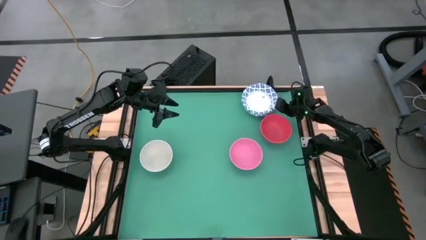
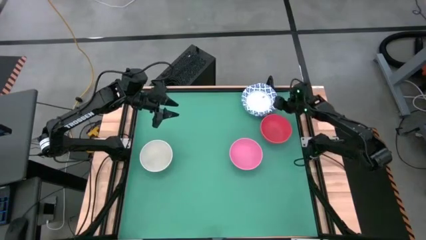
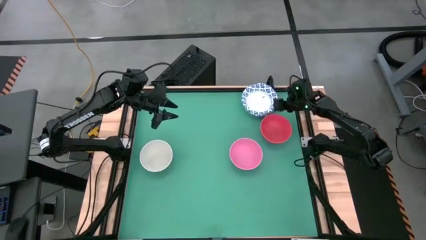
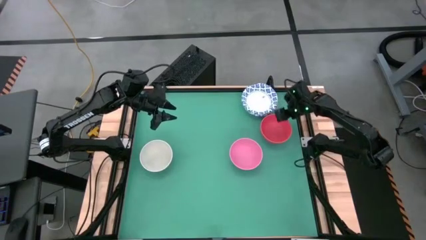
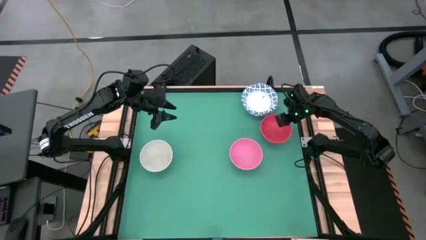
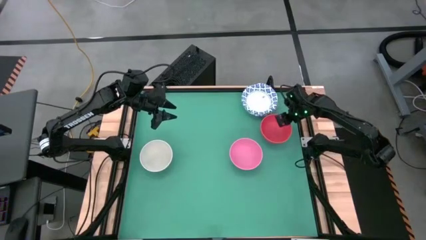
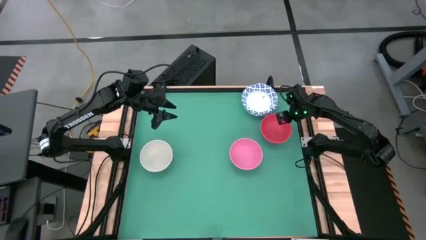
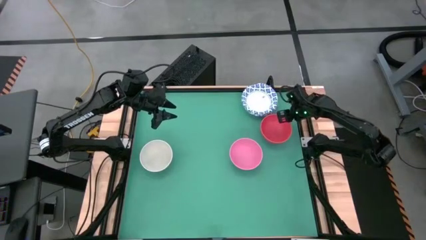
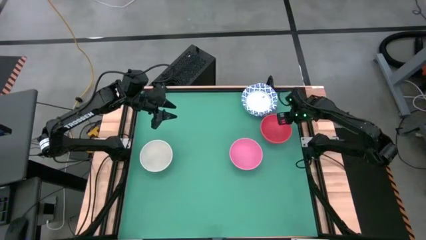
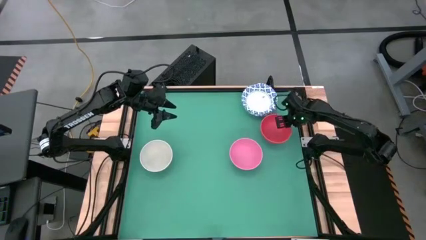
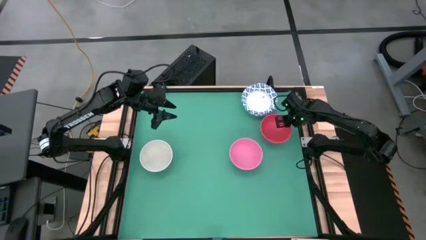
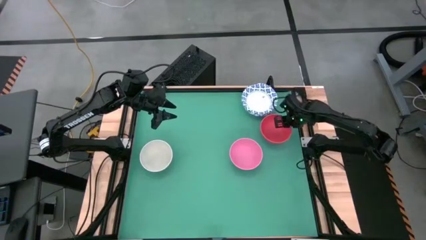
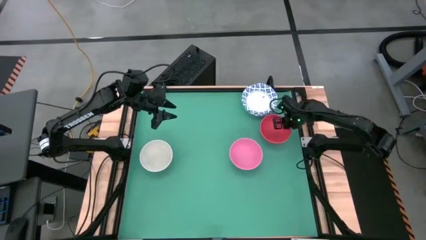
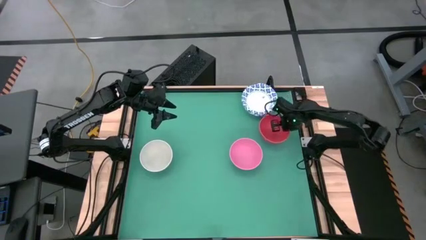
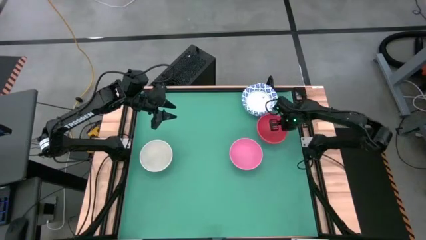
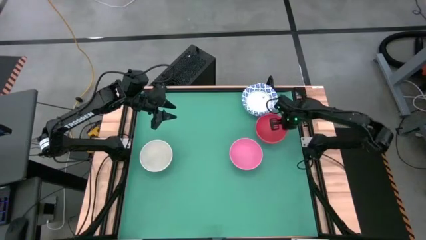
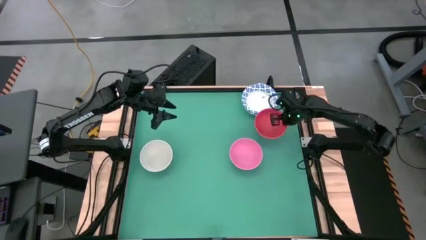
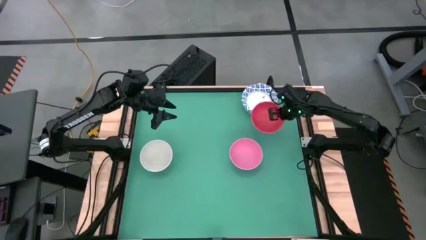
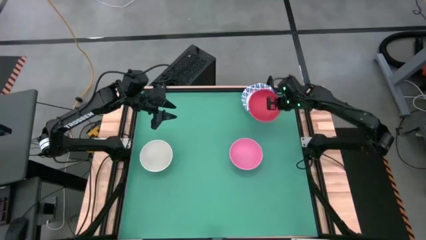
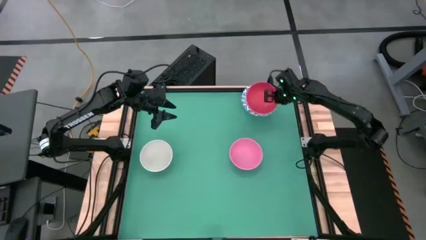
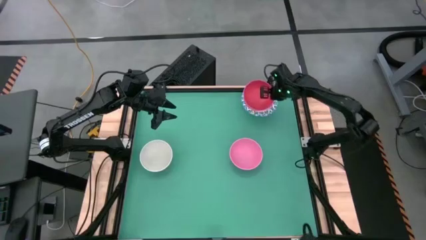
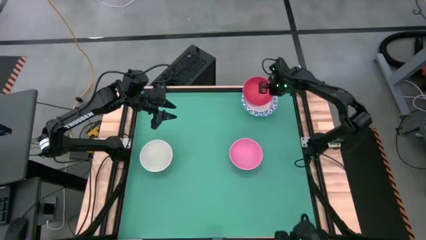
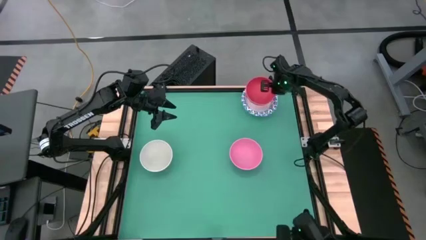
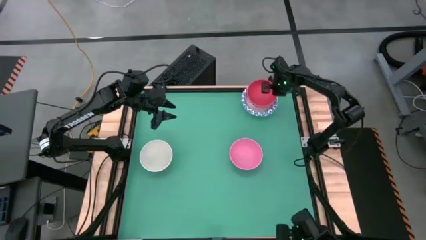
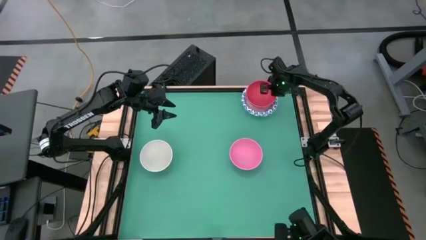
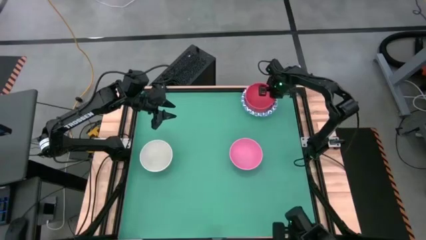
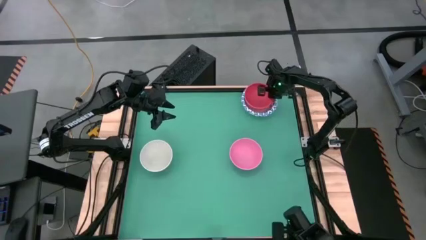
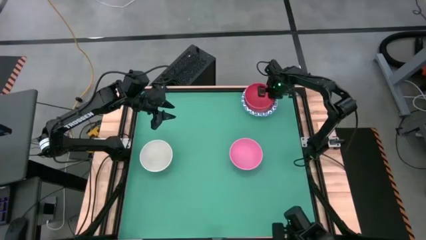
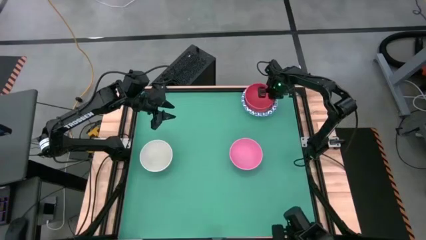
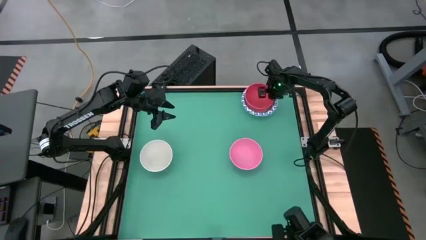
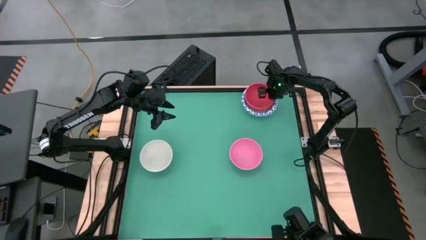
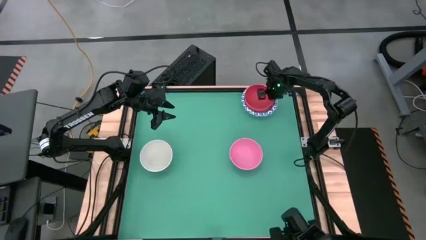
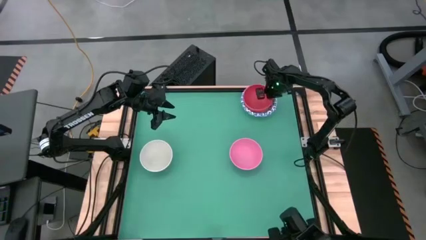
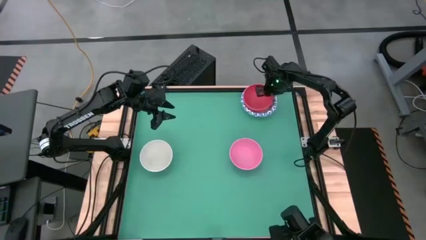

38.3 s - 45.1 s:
Task: Nest bowls inside each other by size order
Stack the orange bowl on top of the white patterned bowl

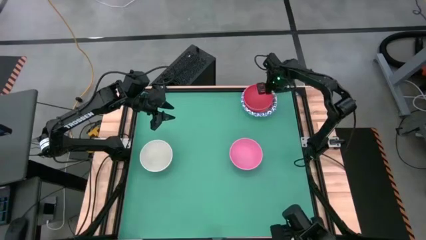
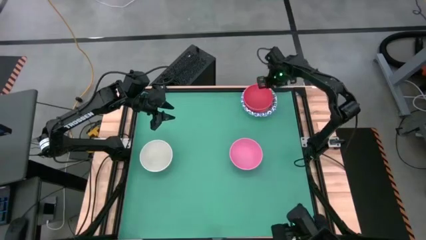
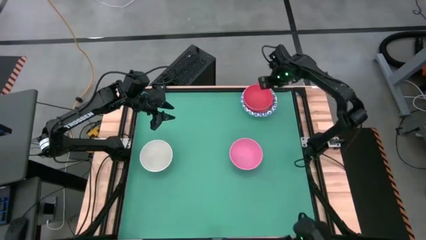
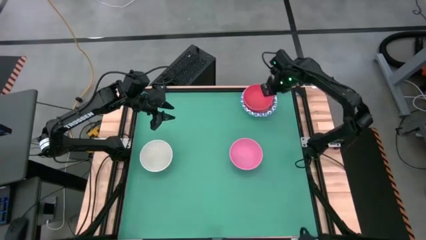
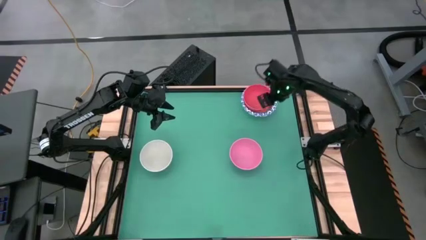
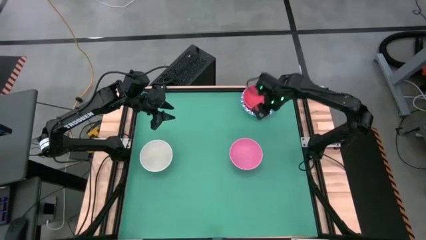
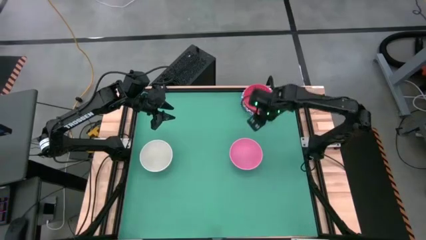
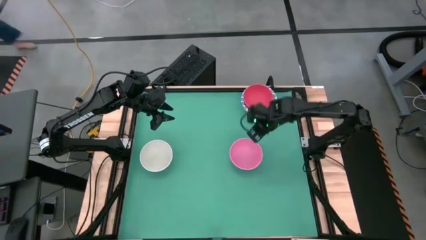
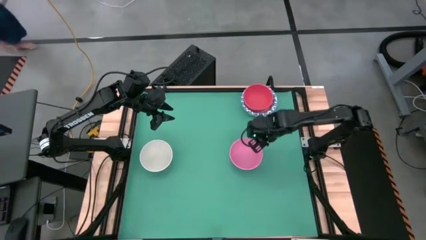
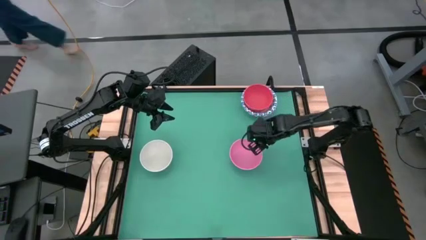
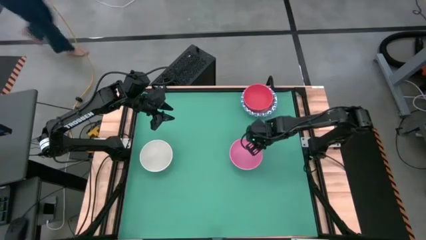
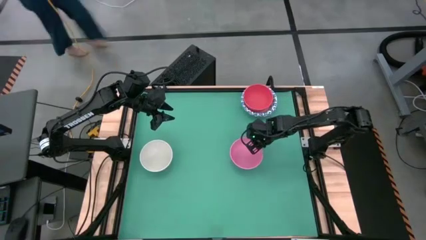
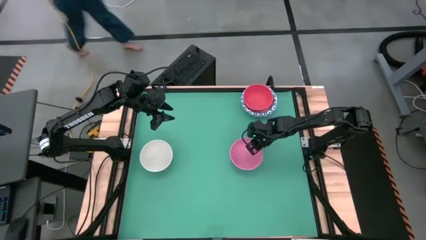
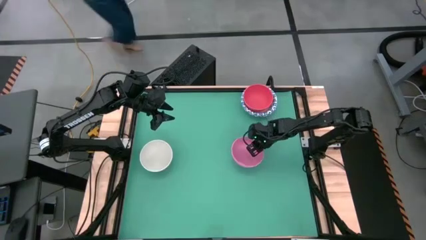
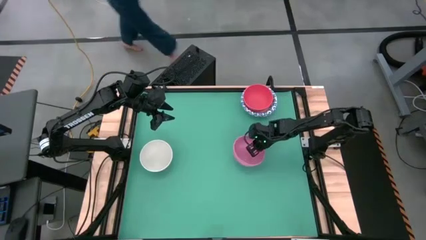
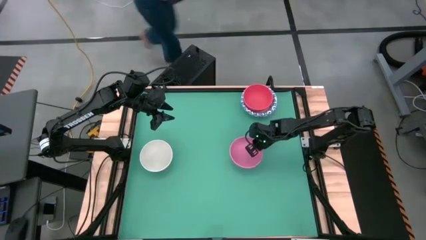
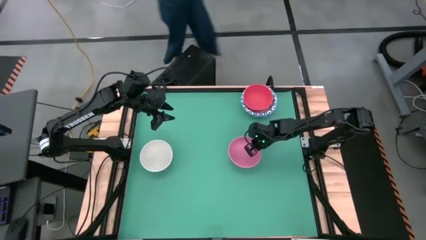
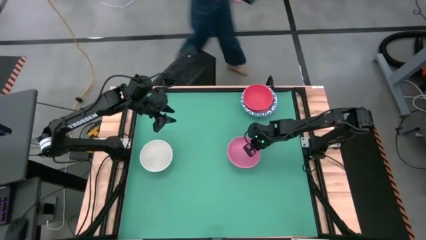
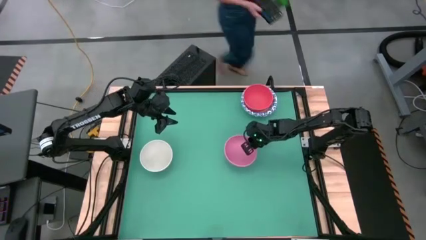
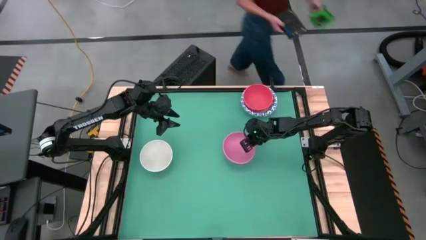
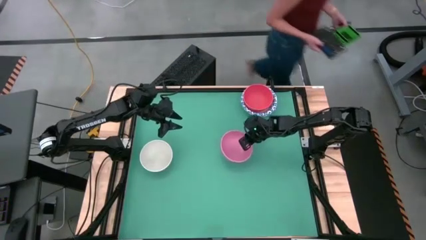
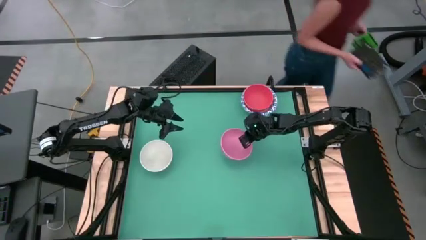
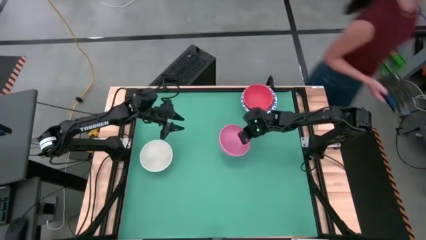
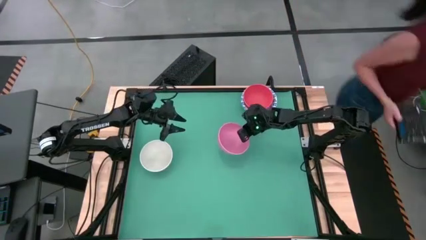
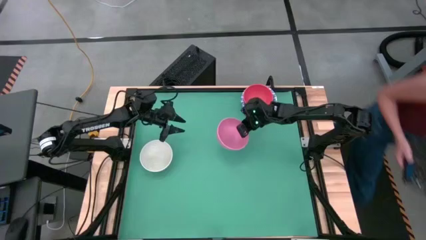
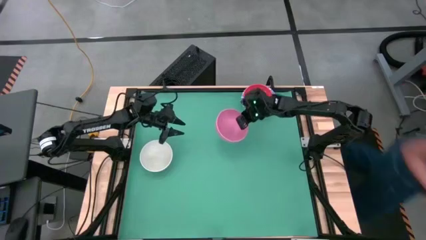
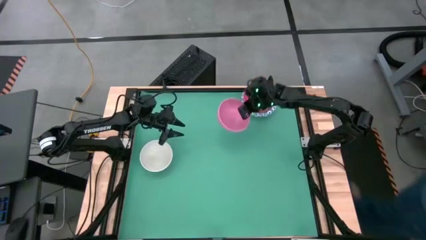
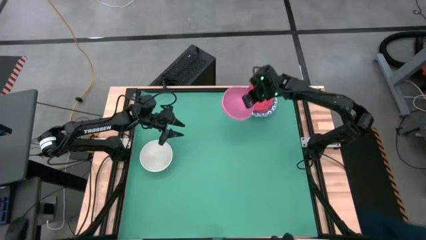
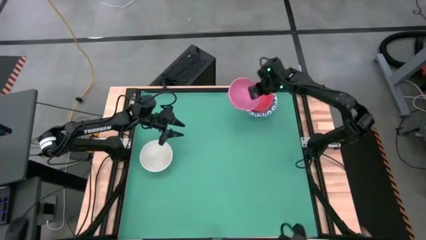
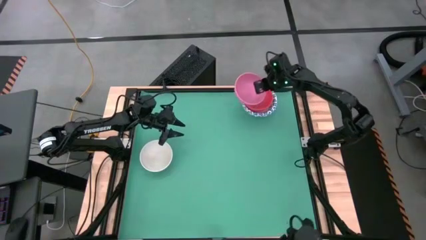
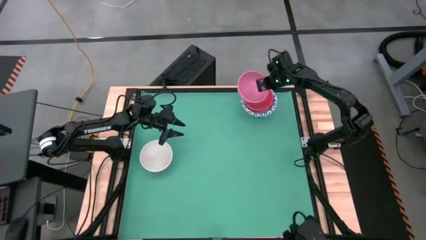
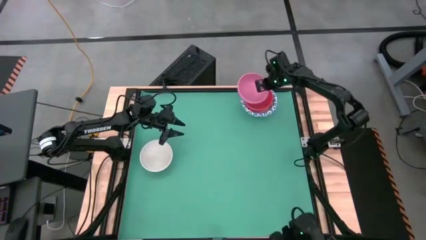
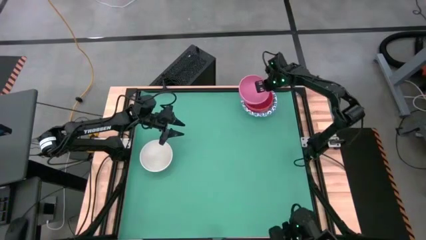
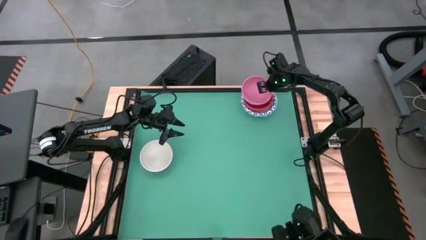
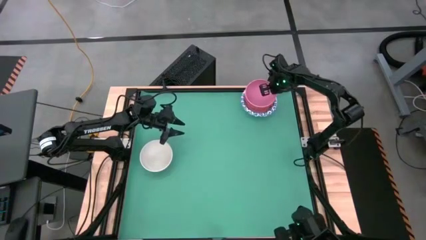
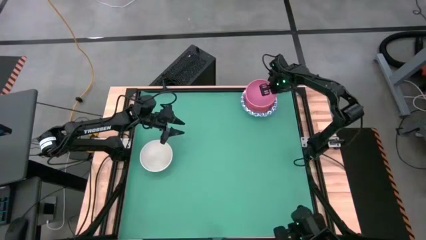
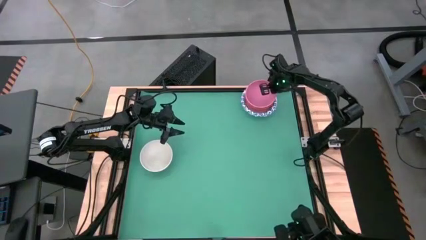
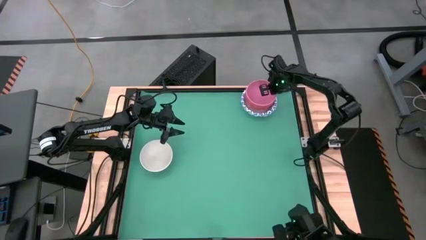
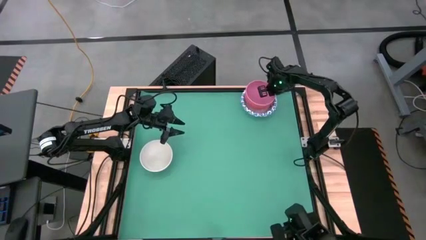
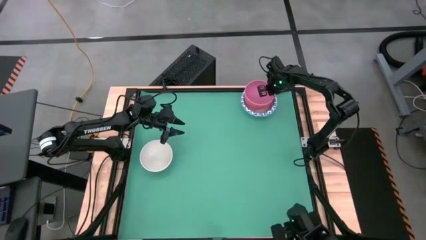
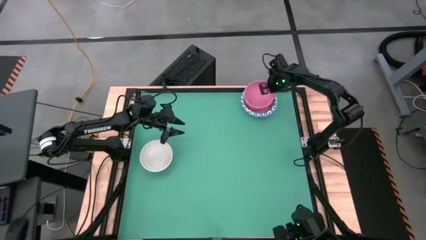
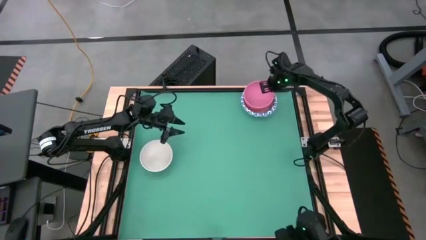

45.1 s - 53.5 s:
Stack the pink bowl on top of the orange bowl

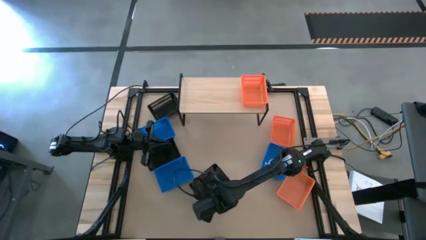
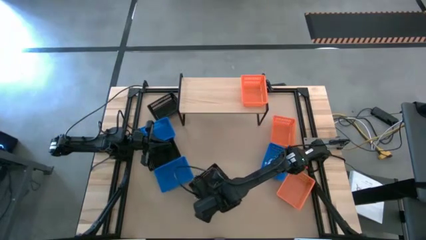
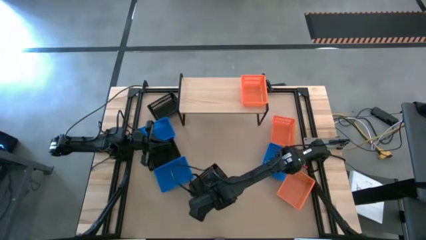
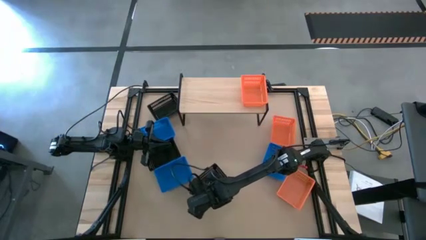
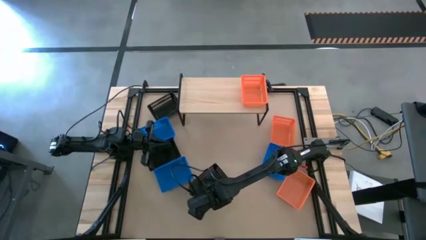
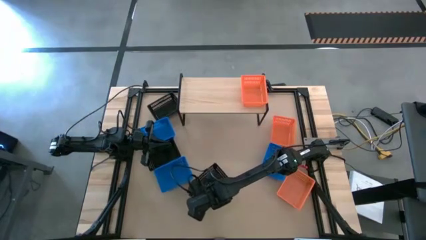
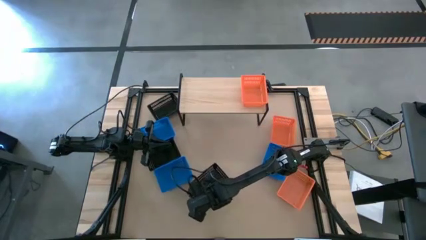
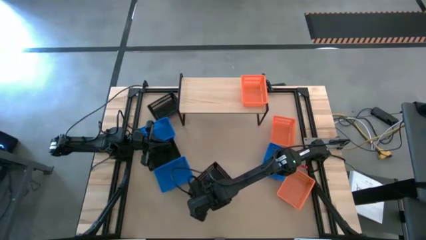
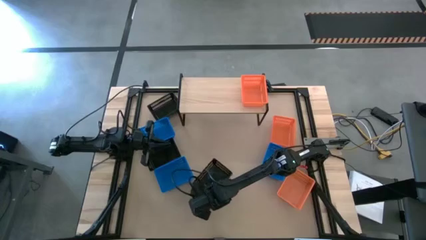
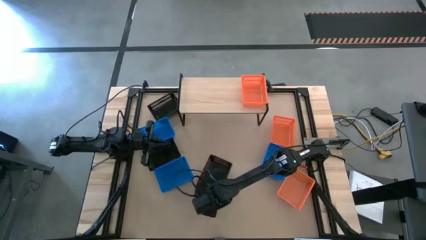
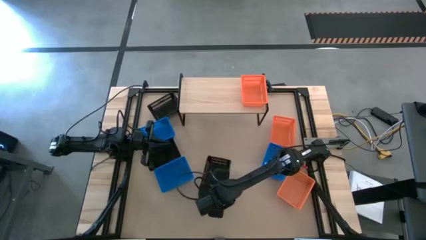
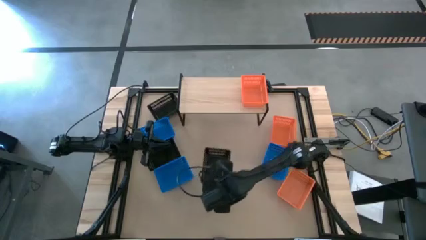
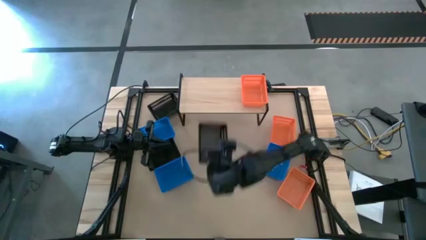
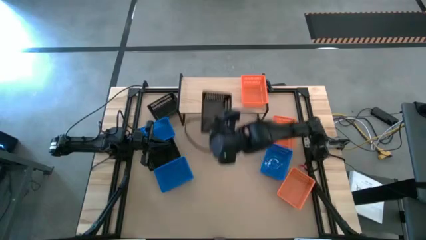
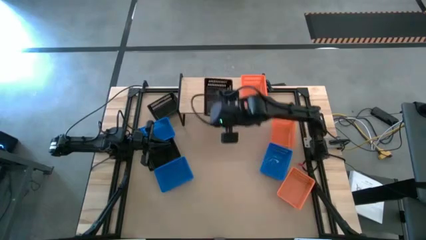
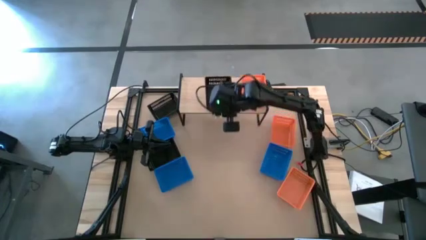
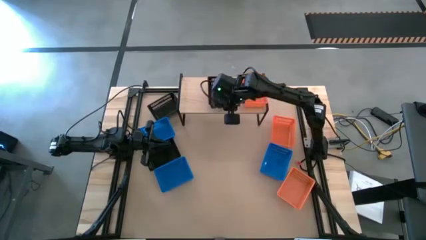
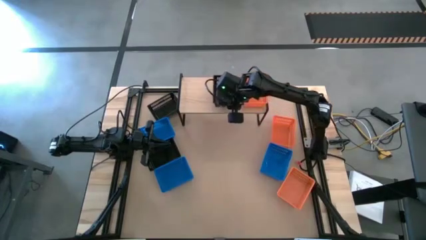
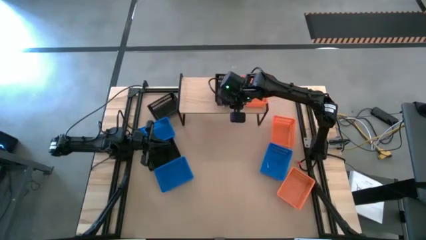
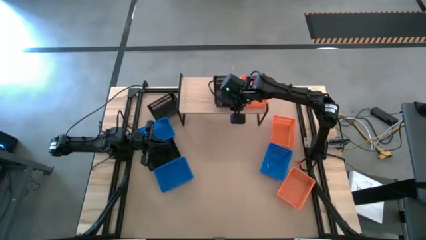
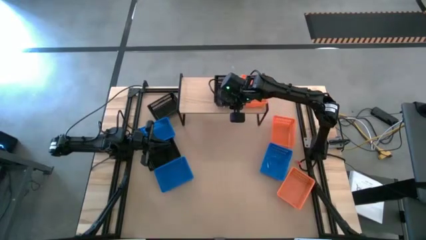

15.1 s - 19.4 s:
Task: Stack baskets on shelf by color
Put the bottom black basket on the shelf
